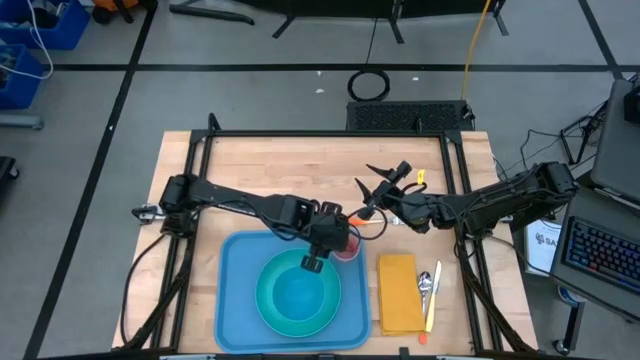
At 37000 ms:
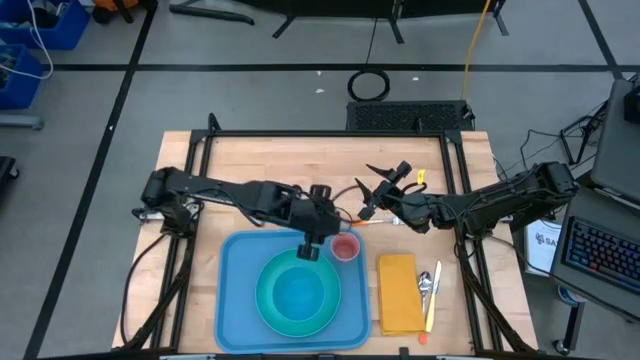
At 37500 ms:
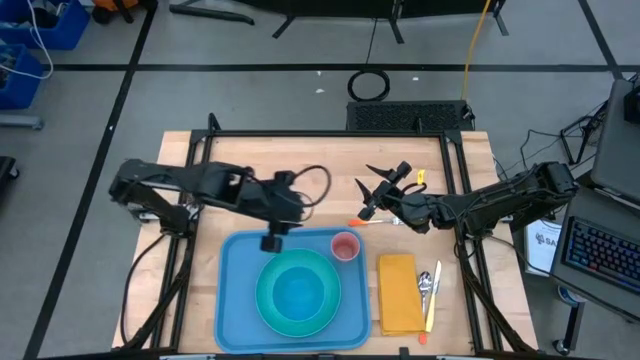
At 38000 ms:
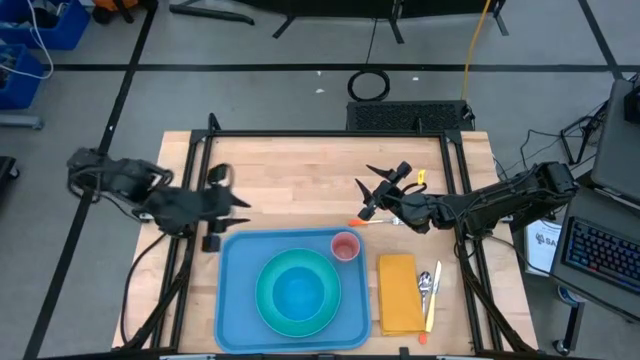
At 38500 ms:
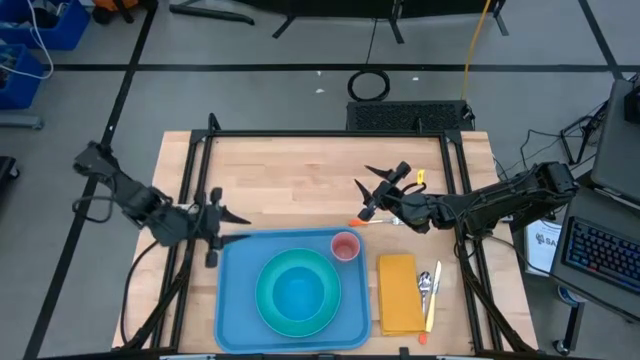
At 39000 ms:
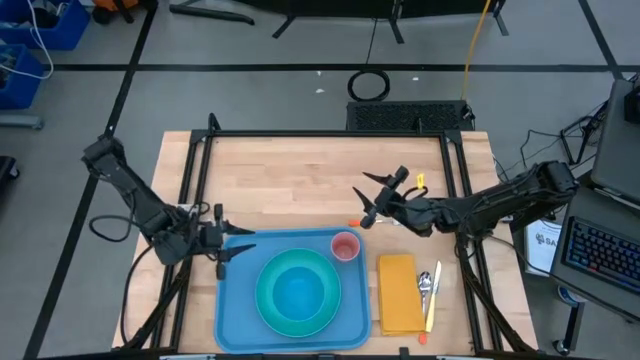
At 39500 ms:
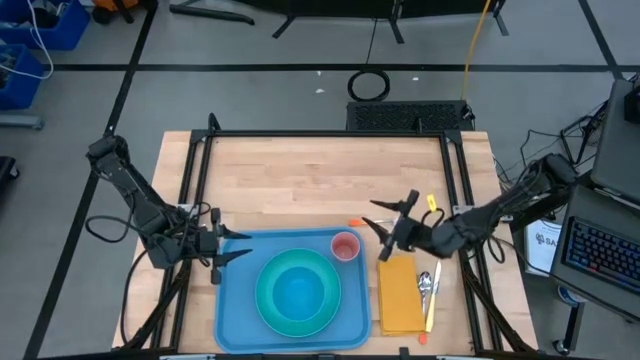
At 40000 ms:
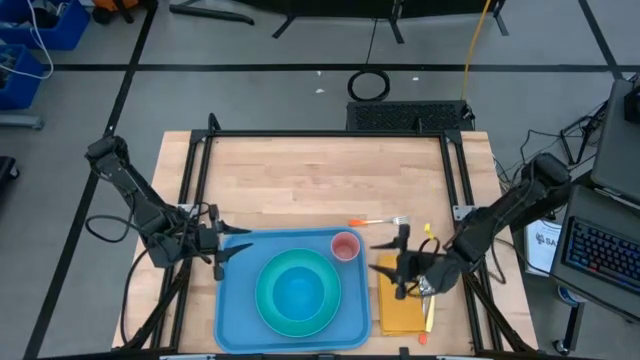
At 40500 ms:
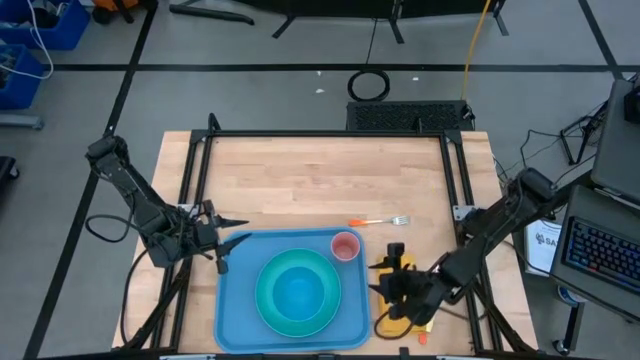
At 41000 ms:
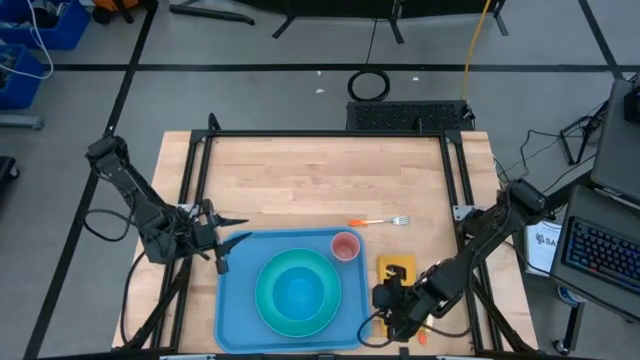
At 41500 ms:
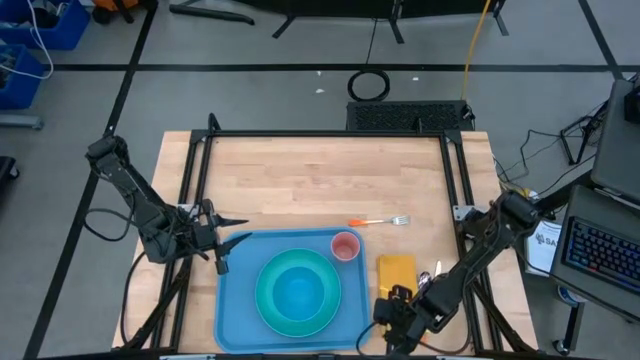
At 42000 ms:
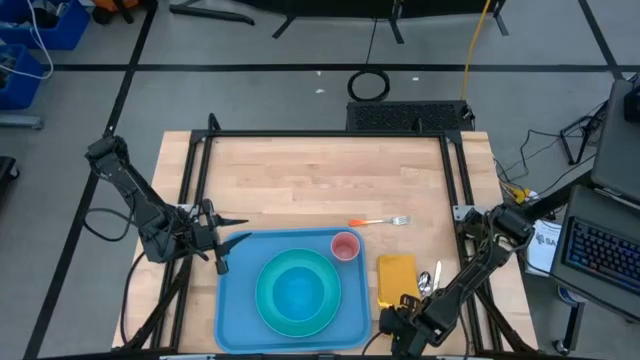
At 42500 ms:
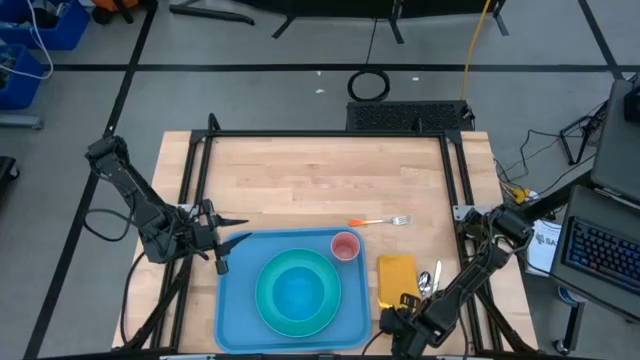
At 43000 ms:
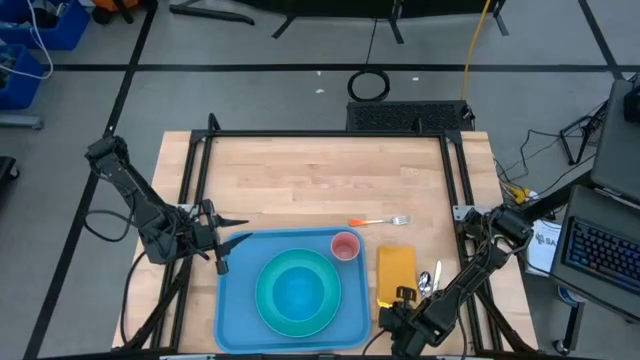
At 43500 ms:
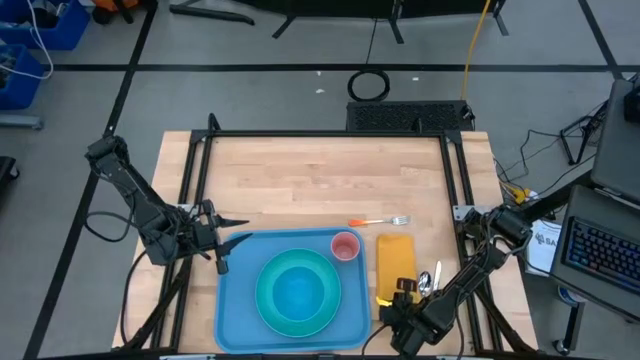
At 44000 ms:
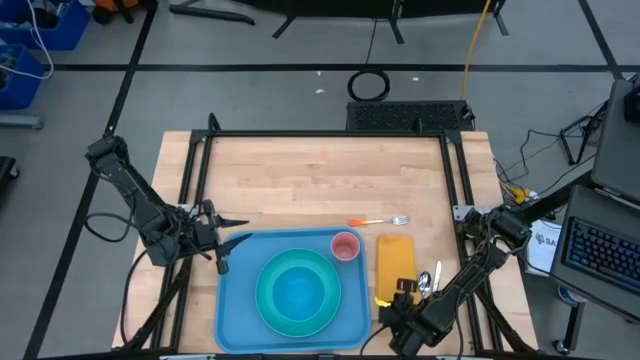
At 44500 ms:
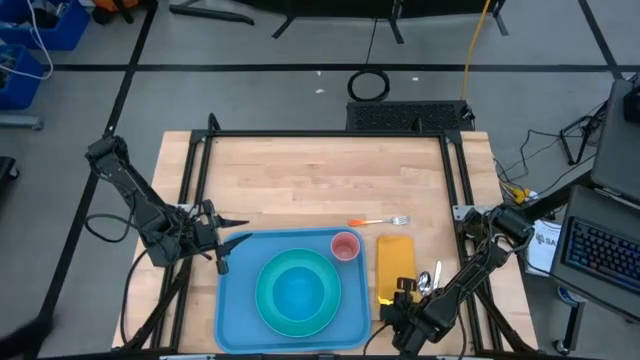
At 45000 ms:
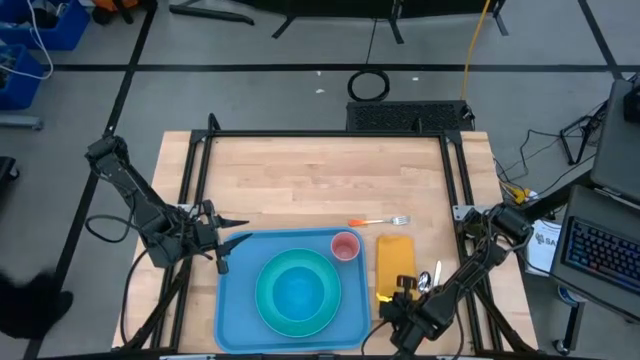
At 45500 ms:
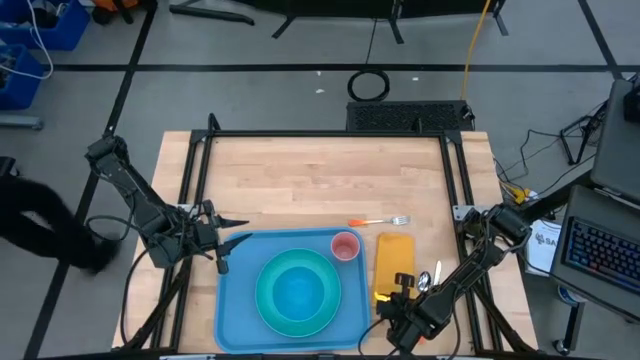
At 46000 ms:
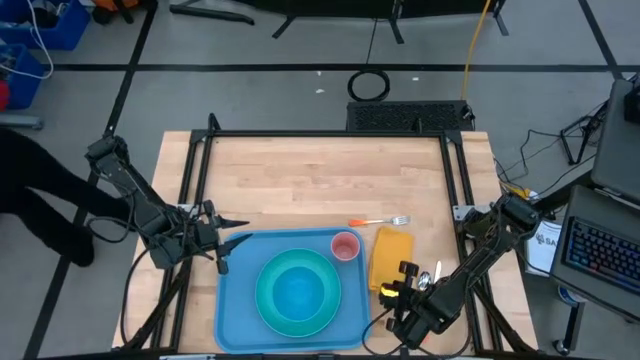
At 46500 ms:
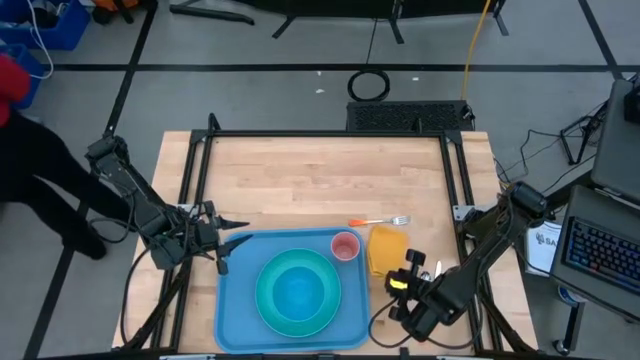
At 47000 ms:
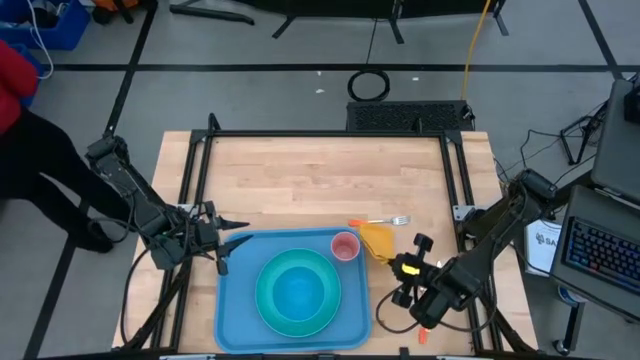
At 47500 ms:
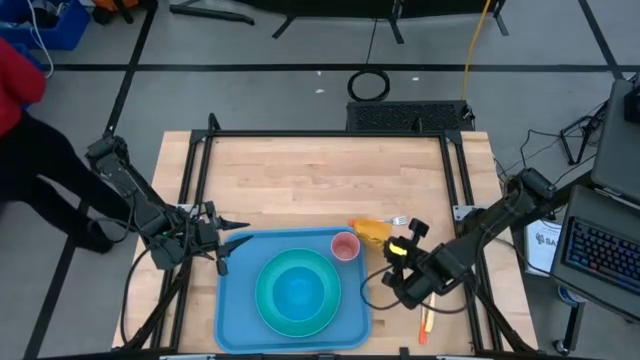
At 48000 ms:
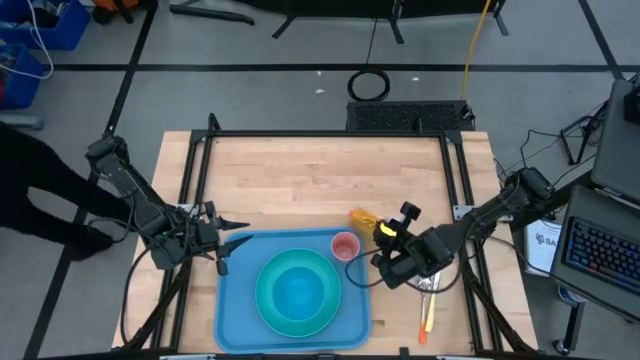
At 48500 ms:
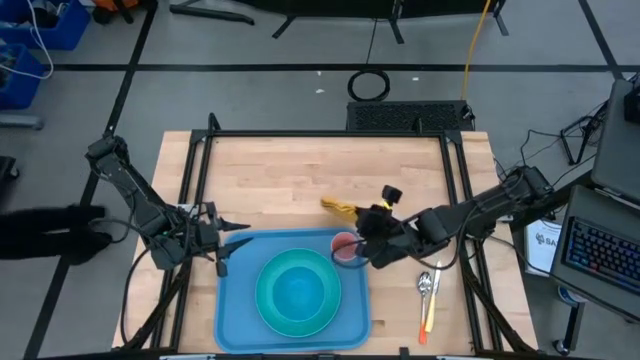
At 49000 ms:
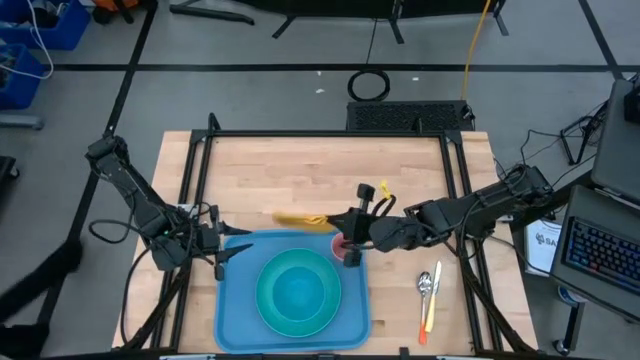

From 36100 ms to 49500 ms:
Task: Set up tray
Put the yellow table napkin on the serving tray to the left of the light blue plate

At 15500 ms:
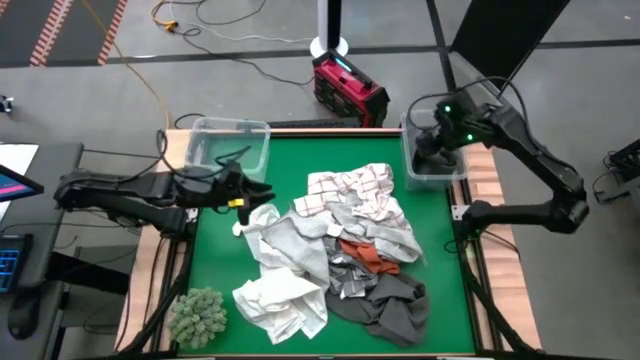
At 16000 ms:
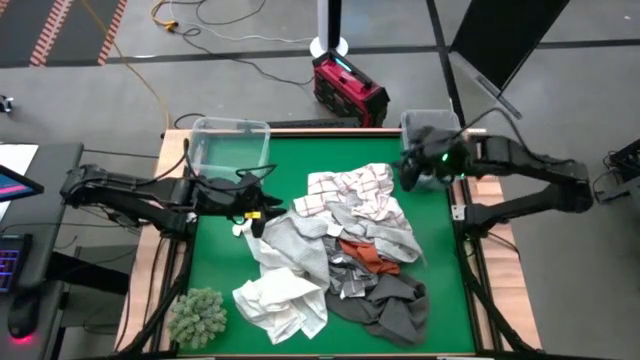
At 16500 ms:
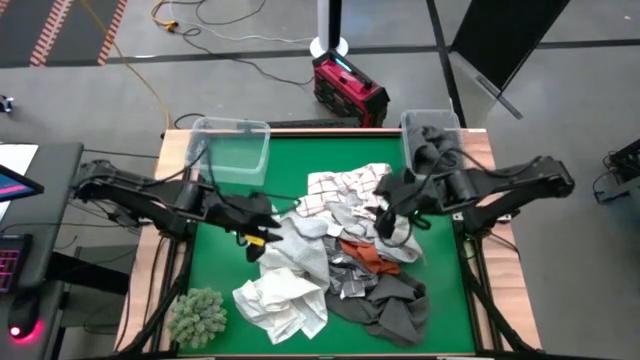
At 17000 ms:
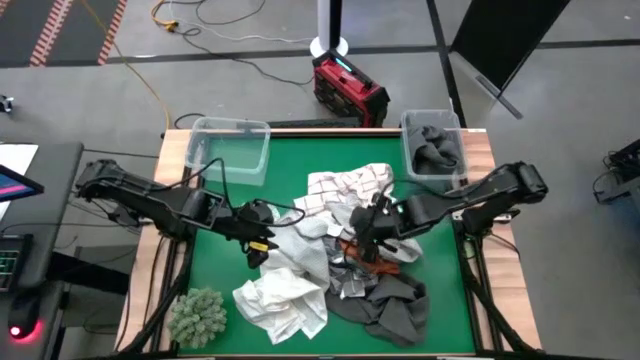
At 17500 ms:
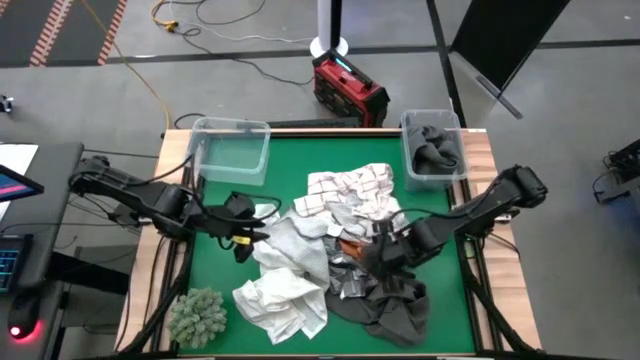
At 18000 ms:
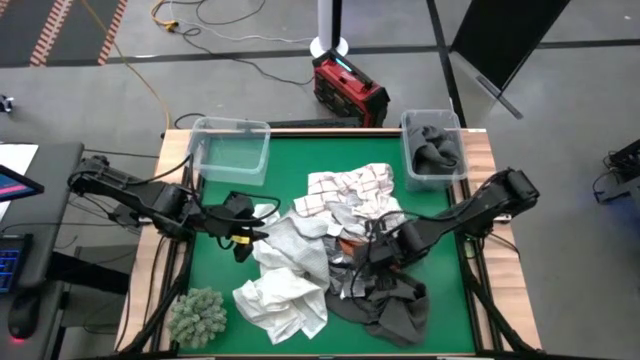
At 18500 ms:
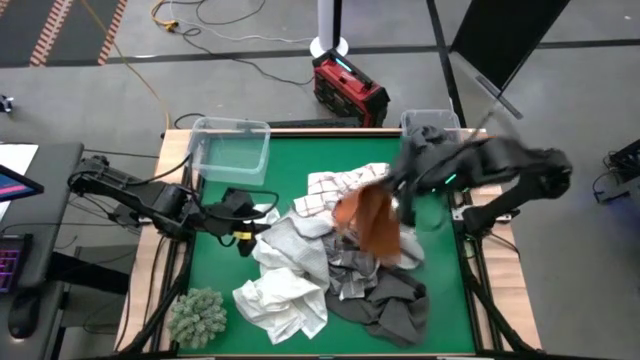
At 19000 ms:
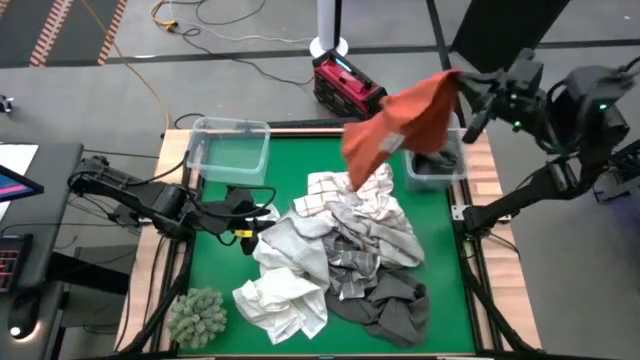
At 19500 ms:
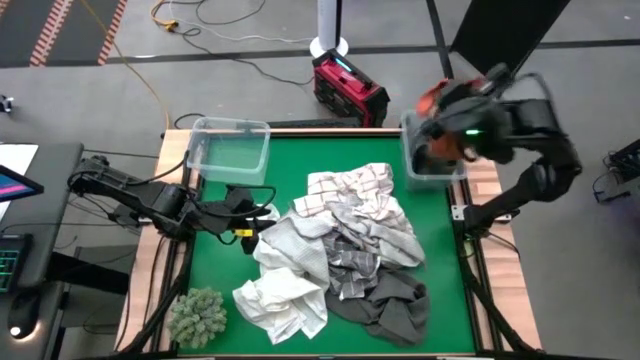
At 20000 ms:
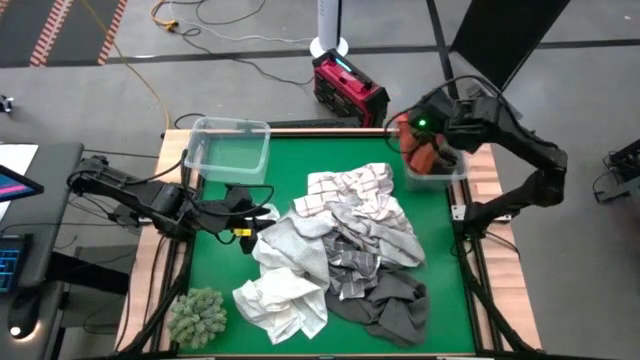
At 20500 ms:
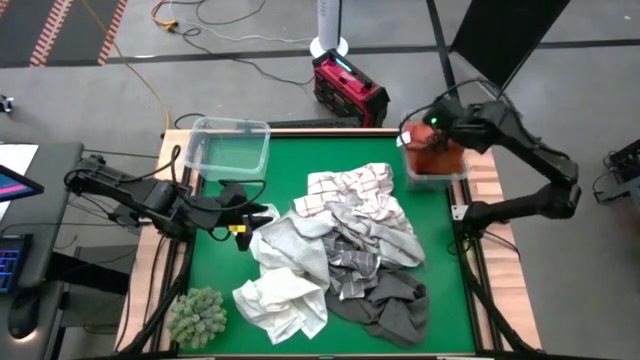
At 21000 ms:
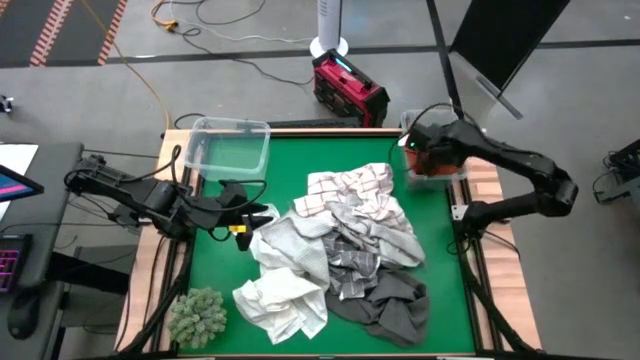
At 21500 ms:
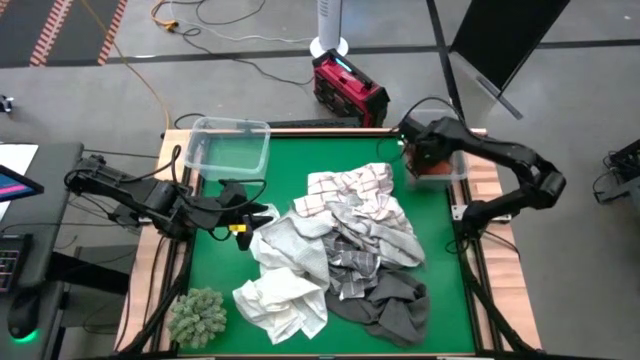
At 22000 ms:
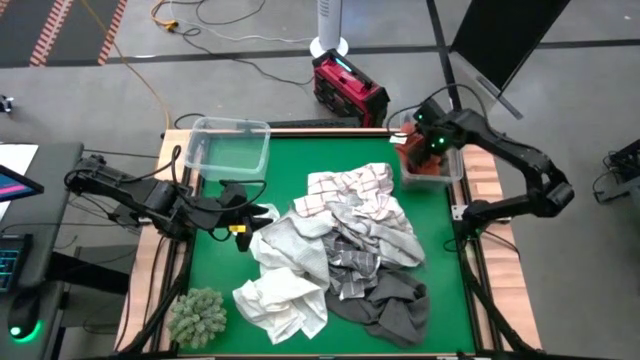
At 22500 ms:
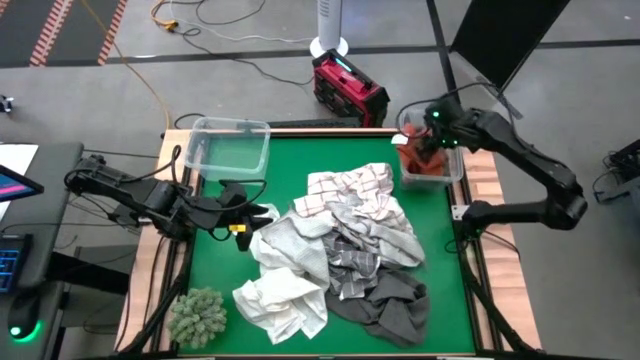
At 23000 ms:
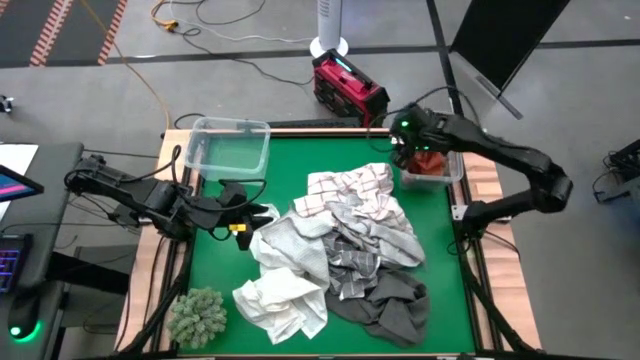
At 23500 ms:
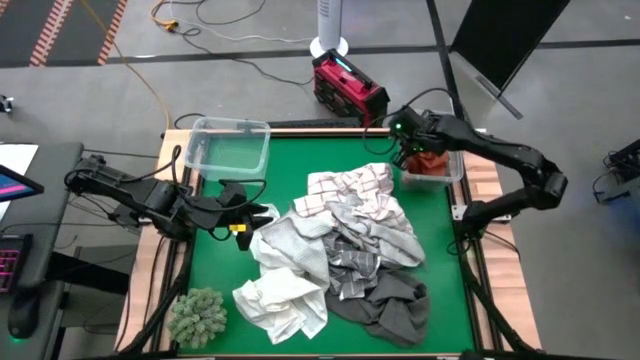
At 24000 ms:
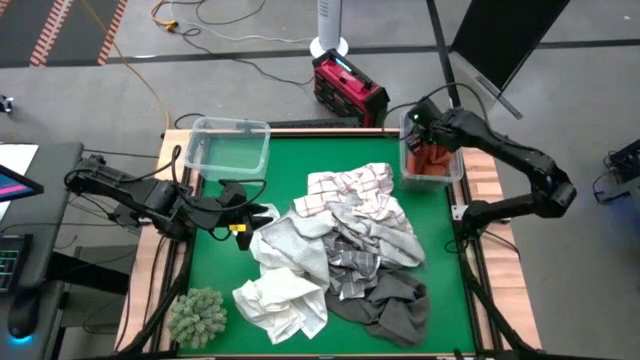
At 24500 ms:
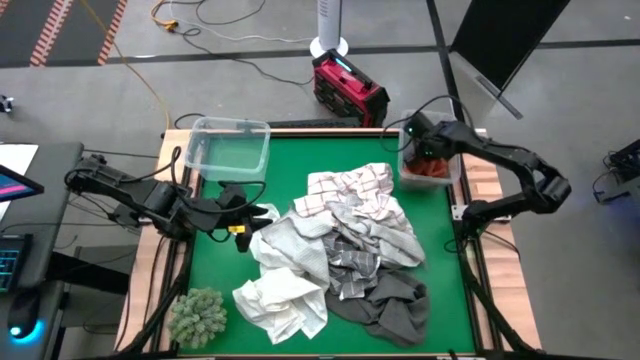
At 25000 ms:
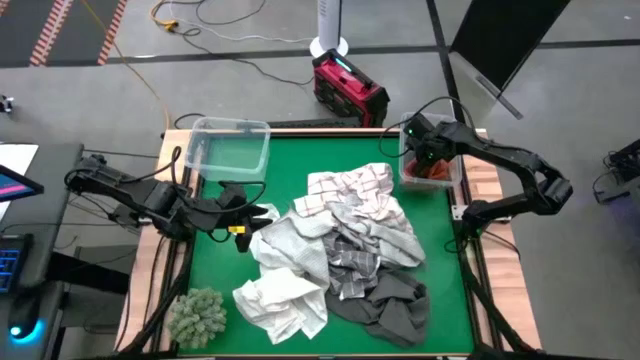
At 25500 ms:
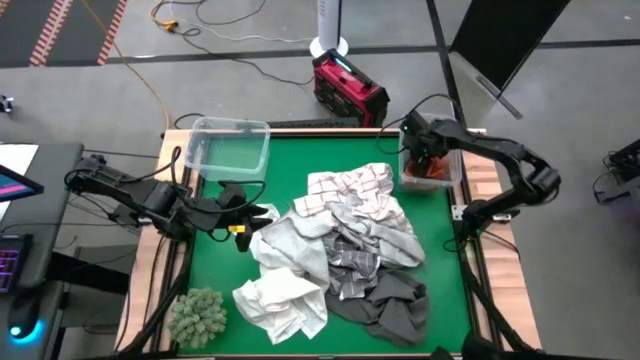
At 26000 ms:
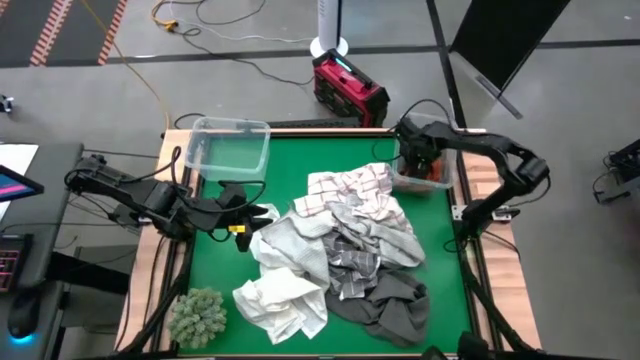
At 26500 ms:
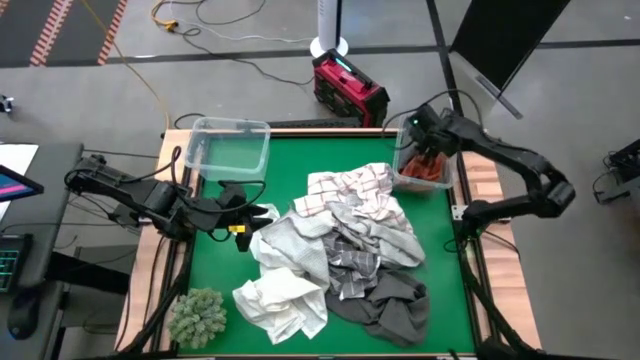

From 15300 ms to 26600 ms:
Task: Sort towels by color in basket
Put the orange towel into the right transparent bin
